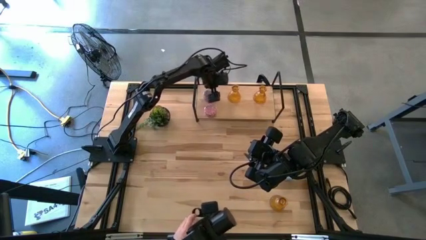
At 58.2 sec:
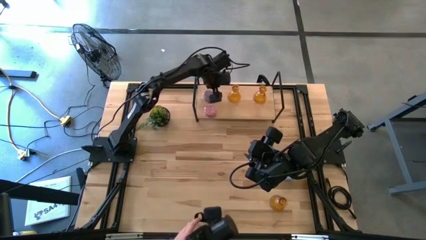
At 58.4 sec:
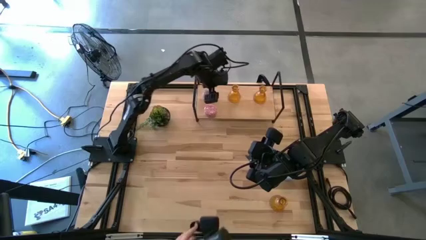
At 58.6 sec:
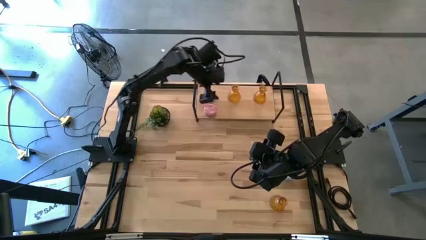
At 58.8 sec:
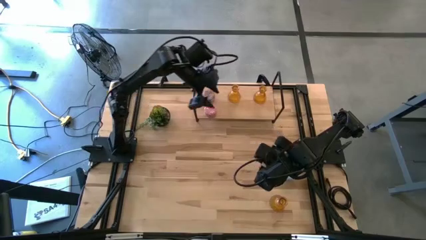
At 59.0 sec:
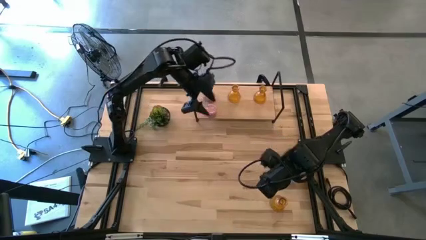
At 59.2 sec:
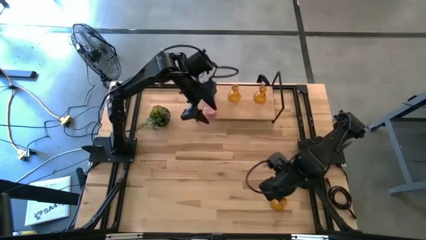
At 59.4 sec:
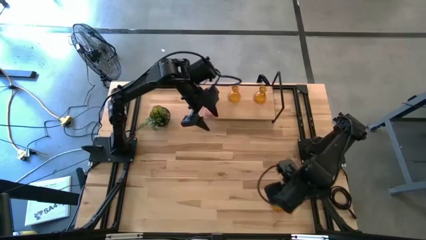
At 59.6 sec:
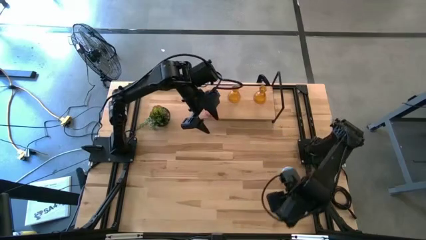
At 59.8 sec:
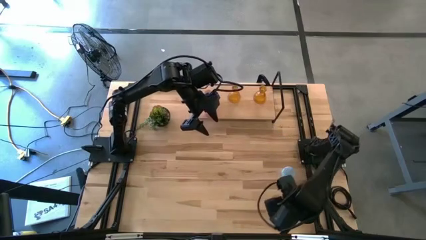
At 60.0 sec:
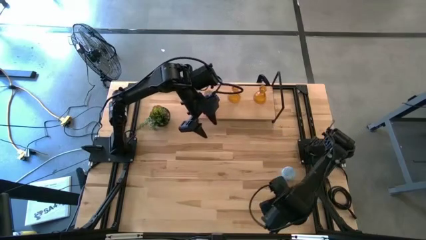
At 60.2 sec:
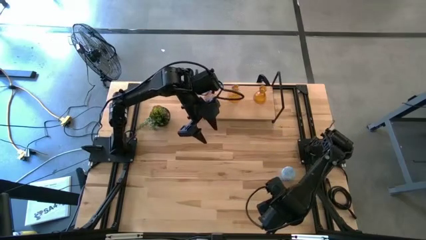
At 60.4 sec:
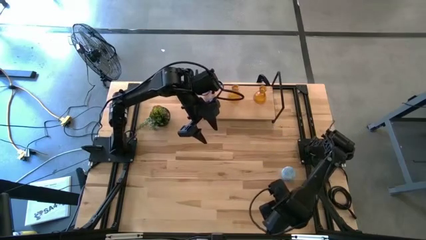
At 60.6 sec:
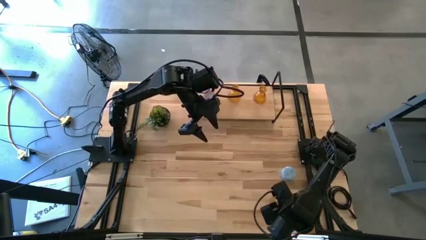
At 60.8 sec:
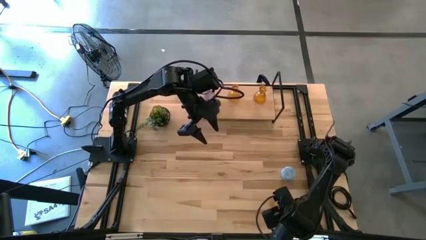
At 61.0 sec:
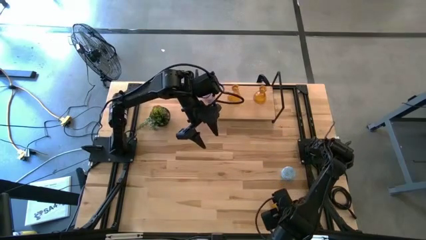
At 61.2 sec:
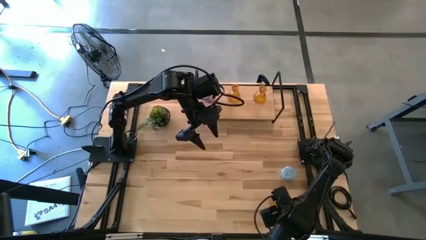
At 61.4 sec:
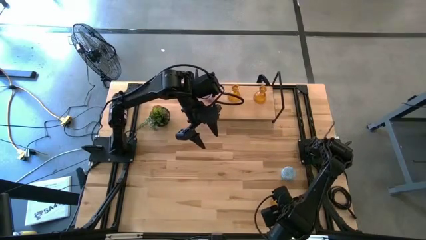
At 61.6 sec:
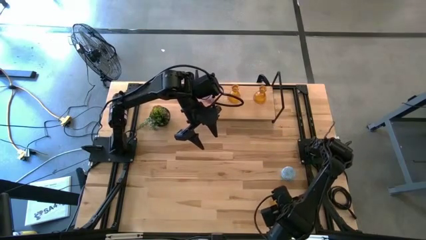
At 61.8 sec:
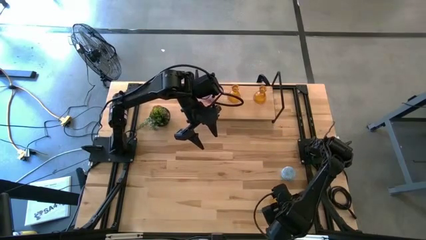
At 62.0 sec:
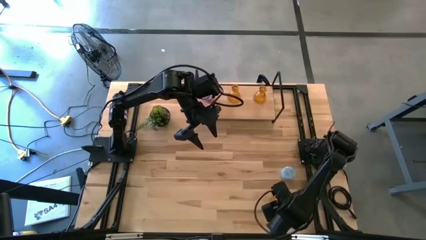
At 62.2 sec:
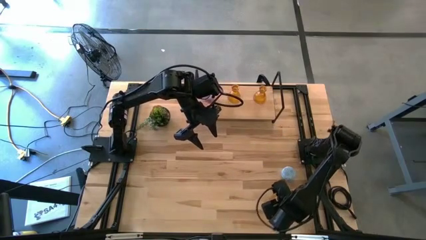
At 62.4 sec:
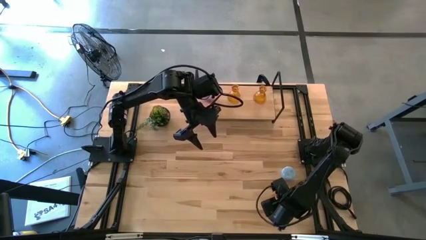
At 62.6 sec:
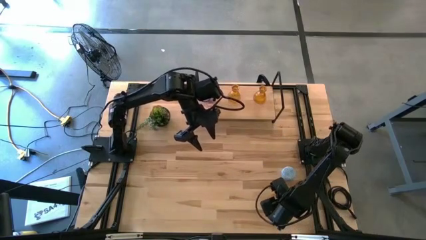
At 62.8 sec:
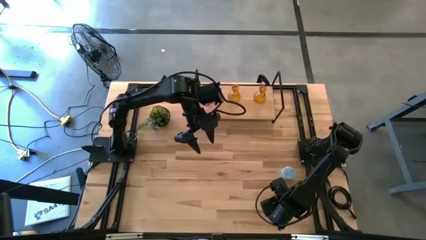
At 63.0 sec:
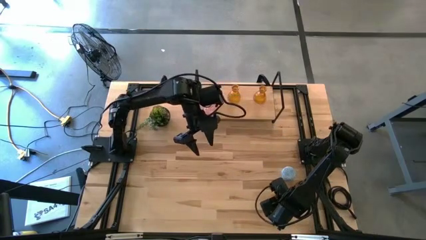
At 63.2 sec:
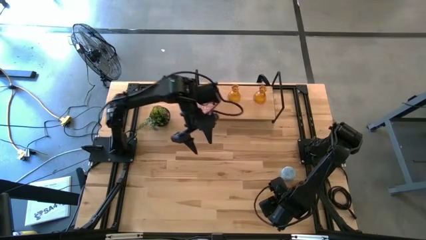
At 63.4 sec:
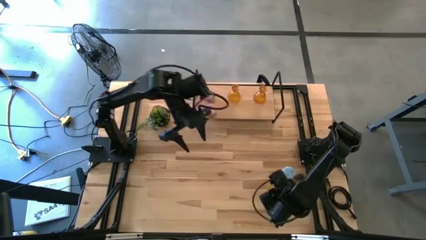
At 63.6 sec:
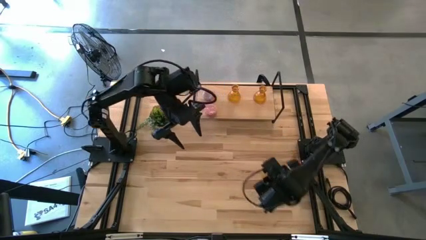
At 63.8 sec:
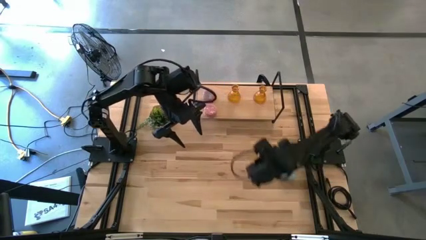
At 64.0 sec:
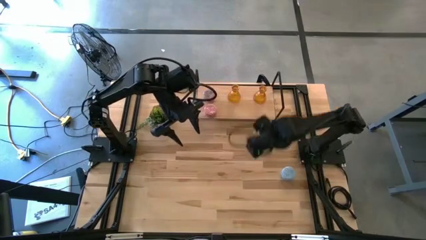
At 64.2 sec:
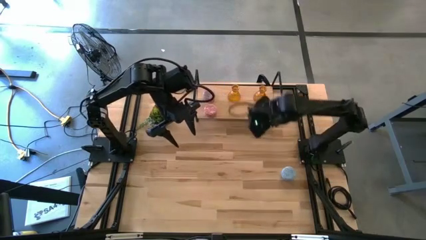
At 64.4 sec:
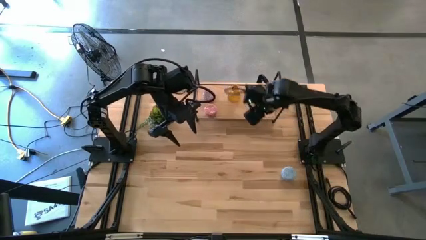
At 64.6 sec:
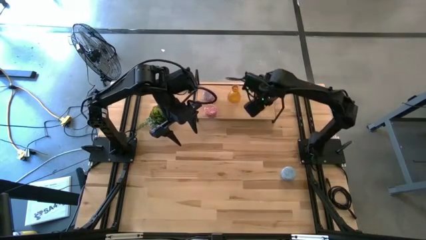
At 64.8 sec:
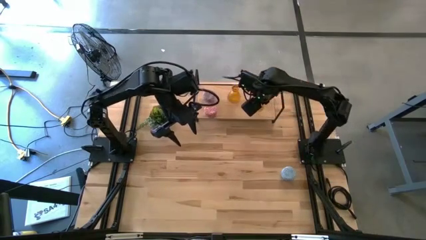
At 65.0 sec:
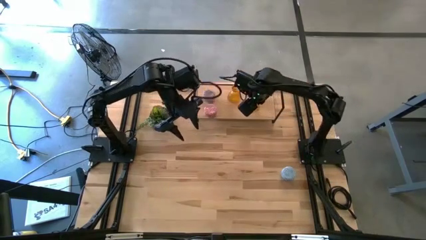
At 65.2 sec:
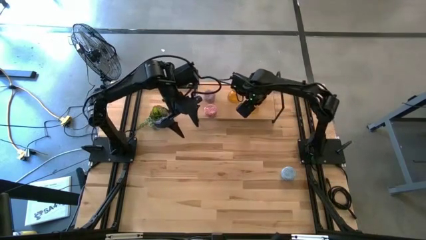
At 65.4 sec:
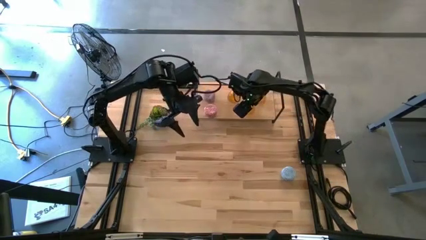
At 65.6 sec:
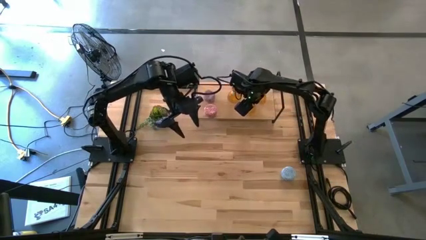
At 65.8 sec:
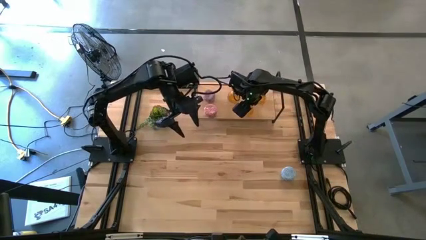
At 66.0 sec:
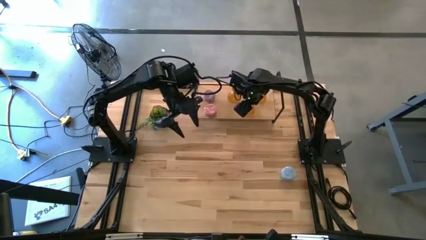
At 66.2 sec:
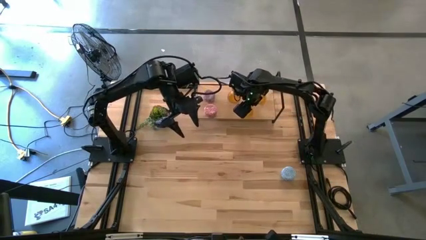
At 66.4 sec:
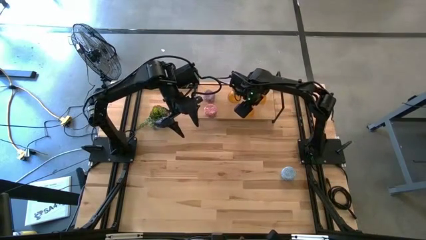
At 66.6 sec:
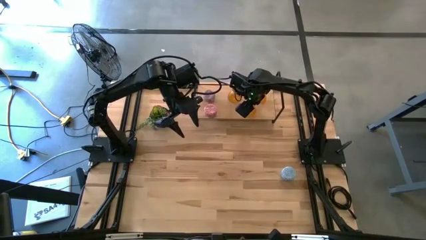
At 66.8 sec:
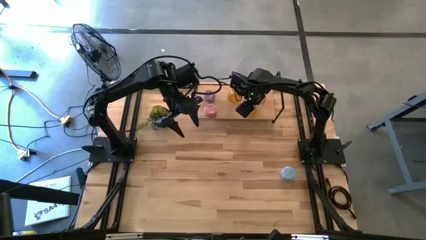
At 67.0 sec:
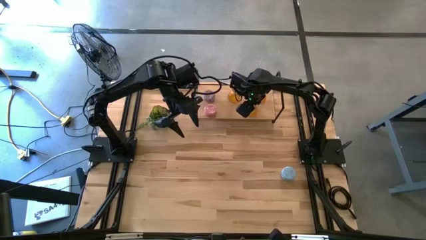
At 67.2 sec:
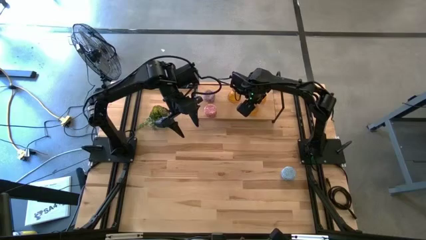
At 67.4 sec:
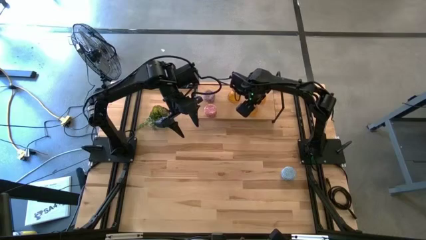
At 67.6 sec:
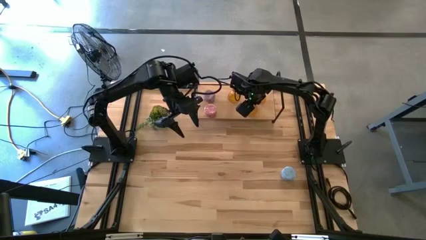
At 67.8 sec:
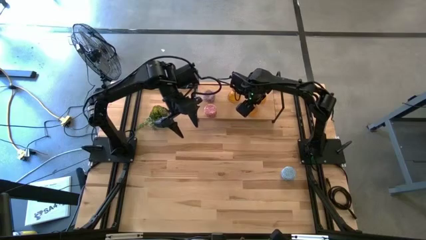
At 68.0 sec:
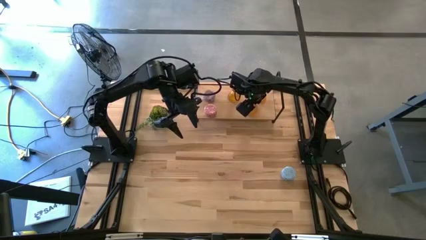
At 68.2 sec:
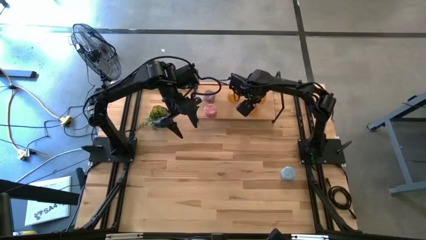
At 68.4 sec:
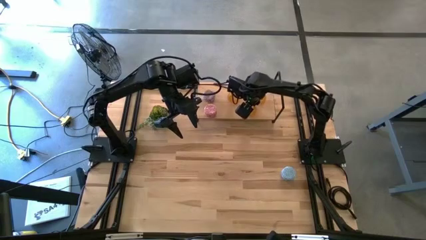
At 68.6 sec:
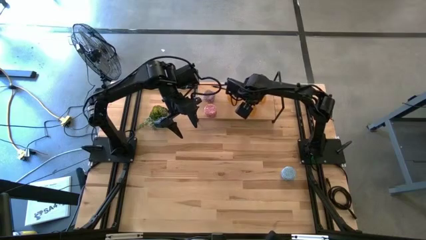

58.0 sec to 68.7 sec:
Task: Pick & Place candle stick holders
Put the orange glass candle holder on the shelf

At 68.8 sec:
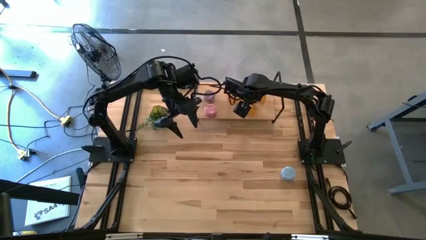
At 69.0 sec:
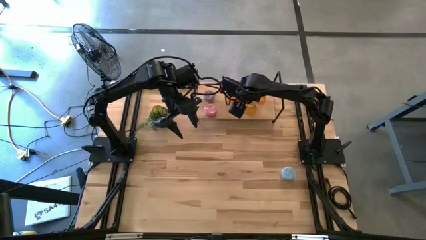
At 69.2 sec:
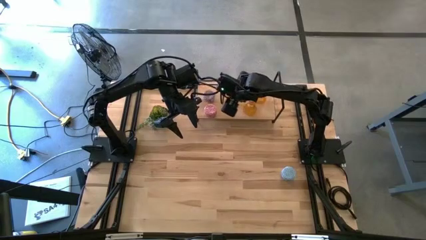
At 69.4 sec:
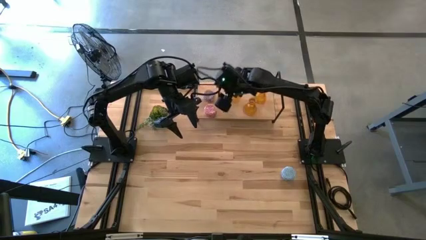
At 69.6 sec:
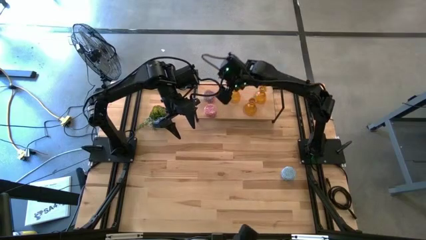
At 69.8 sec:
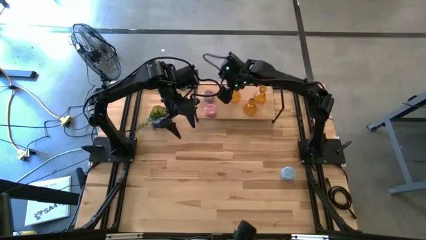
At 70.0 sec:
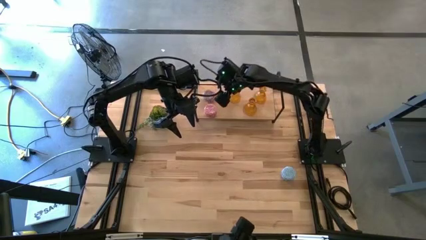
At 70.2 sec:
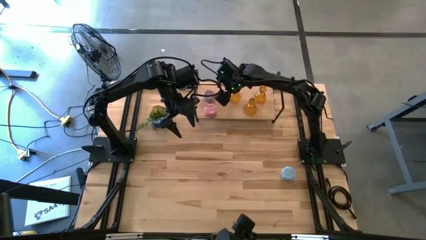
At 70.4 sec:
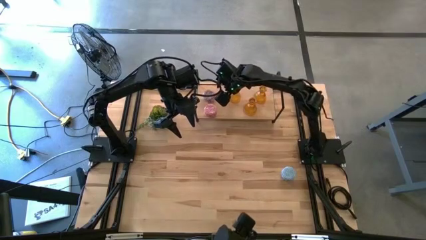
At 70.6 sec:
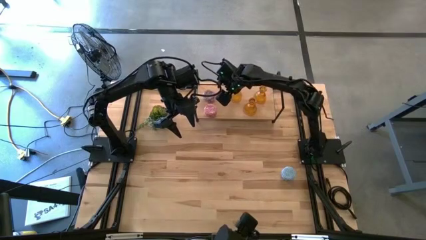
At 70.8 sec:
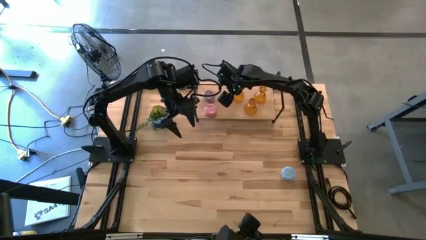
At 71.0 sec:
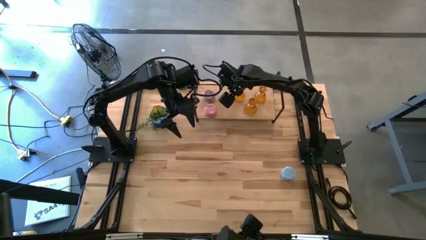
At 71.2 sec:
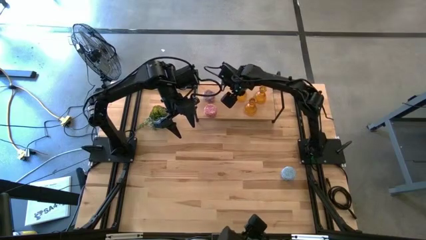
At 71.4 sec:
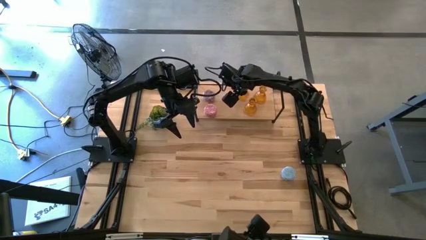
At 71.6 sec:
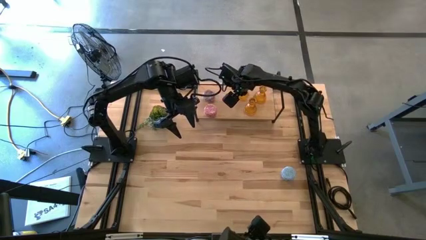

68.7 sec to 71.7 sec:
Adjust the orange glass candle holder on the shelf

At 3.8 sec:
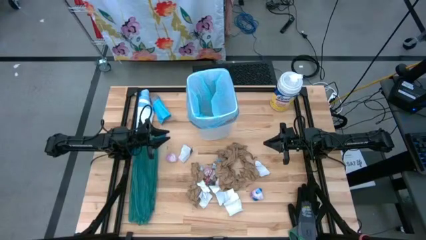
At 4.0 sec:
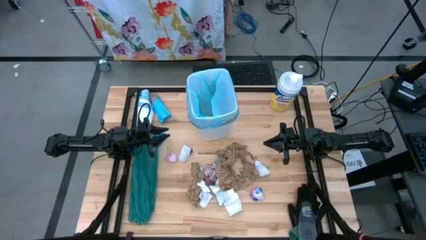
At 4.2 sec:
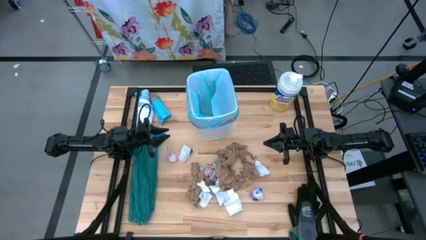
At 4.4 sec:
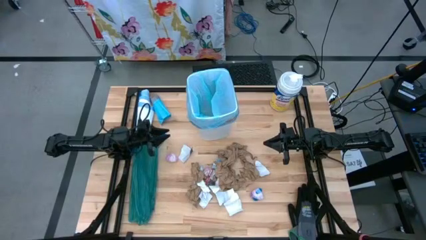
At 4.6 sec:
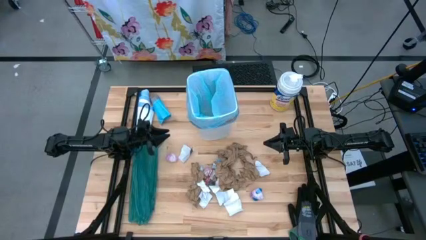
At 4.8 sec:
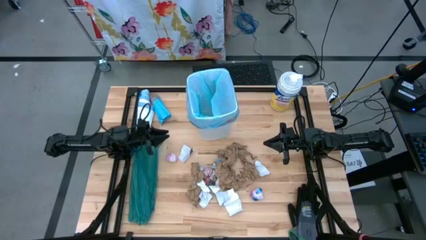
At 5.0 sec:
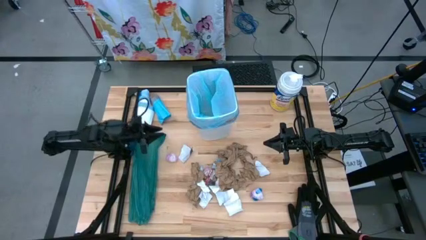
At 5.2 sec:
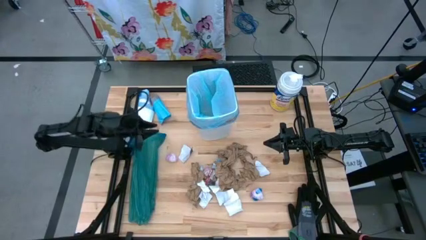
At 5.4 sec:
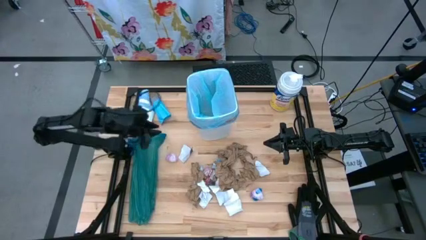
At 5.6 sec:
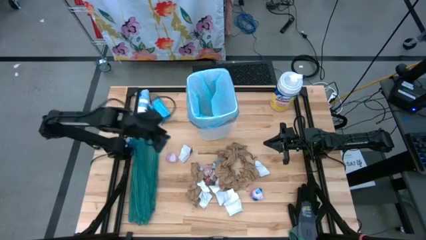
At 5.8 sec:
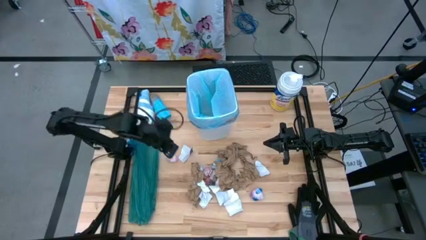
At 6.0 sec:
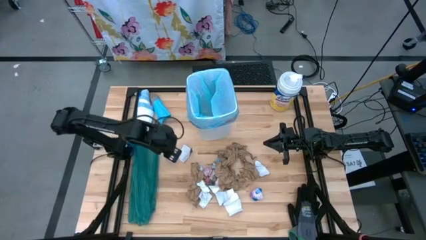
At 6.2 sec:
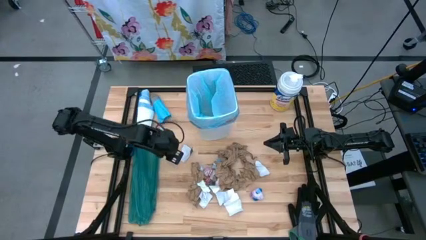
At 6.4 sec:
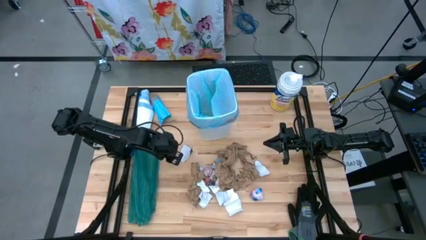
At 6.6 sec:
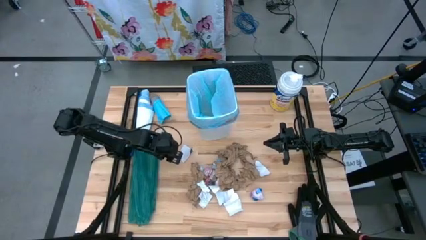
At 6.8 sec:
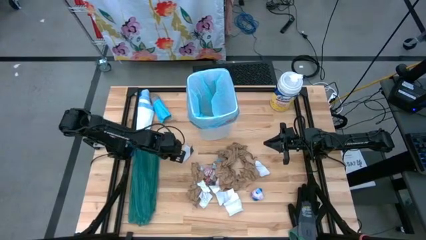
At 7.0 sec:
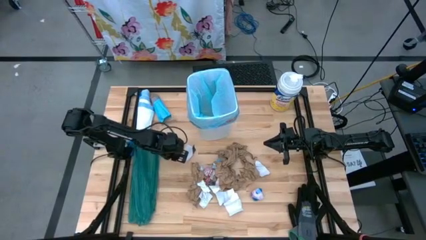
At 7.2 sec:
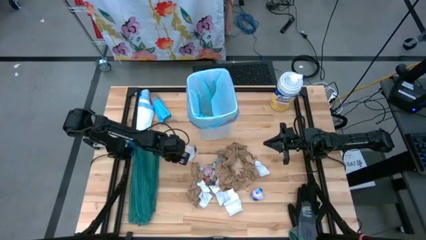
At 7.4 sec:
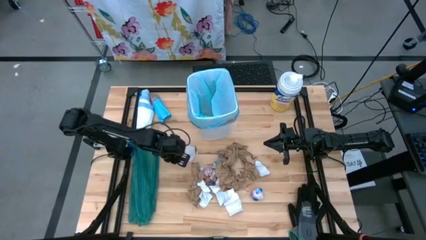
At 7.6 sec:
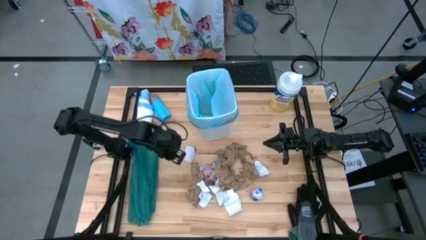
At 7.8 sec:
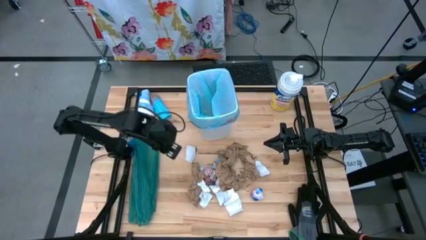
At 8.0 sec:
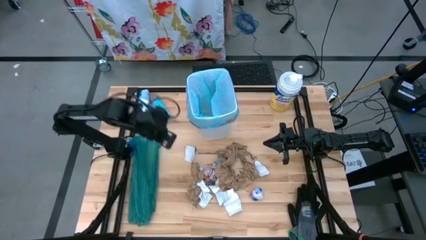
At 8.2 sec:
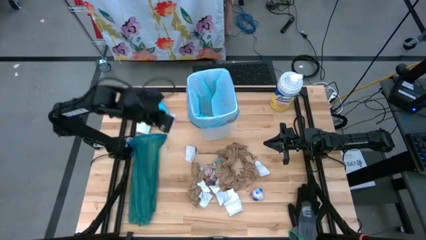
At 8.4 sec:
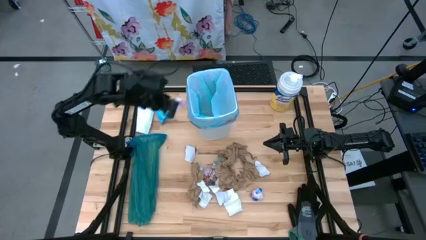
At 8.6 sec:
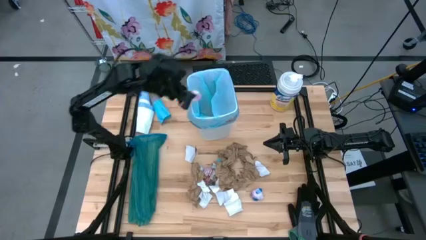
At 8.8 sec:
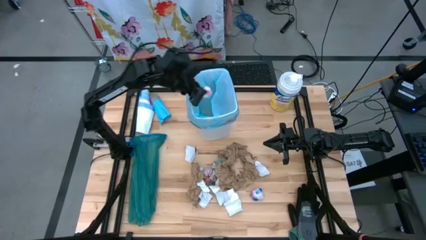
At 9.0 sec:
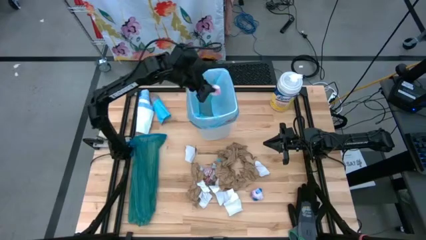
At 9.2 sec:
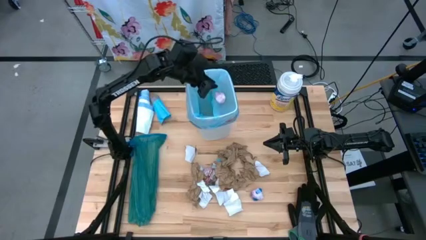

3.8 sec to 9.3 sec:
Task: place trash/remove bag and relplace
Put the pink plastic into the trash bin
